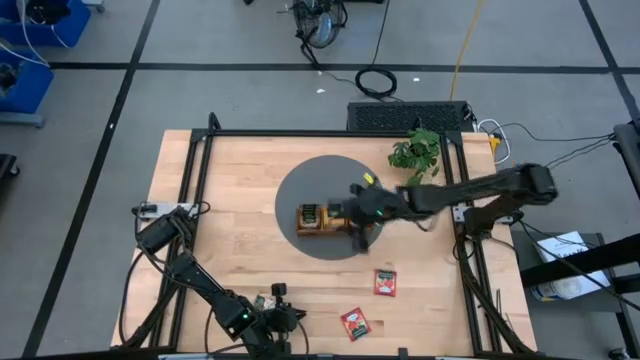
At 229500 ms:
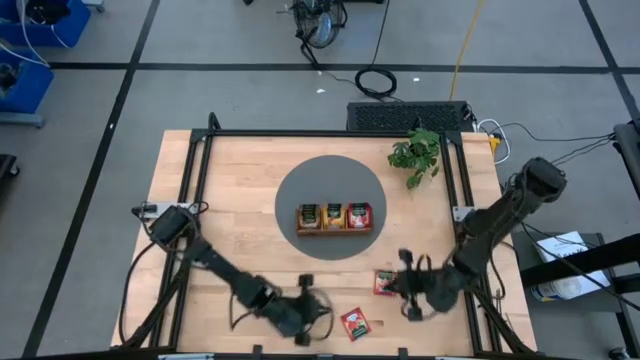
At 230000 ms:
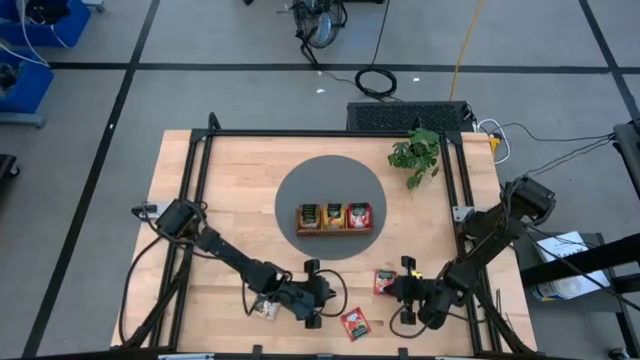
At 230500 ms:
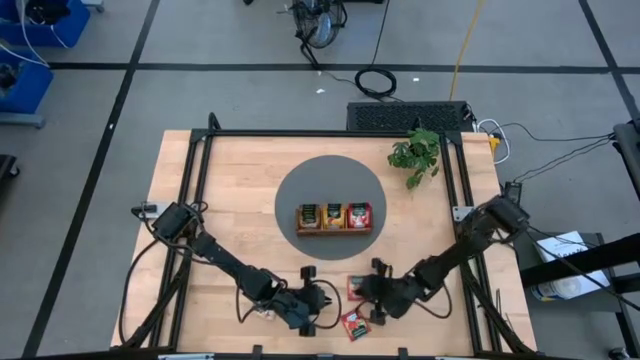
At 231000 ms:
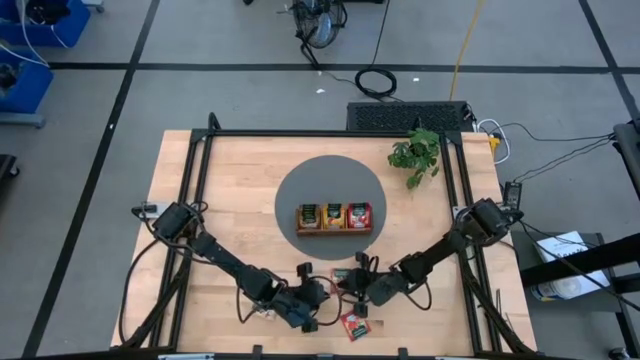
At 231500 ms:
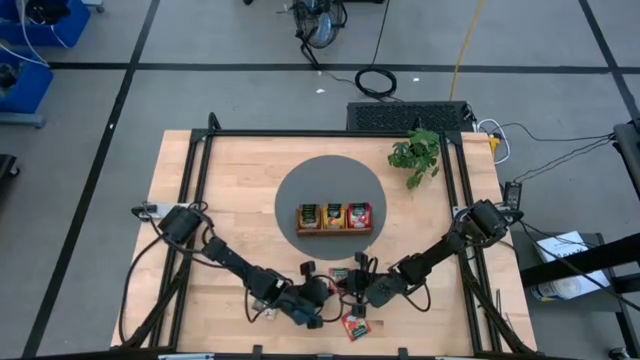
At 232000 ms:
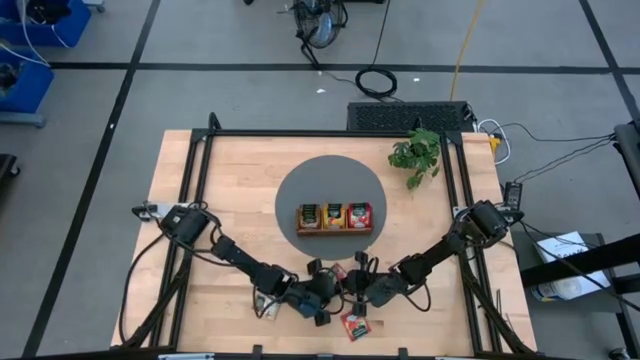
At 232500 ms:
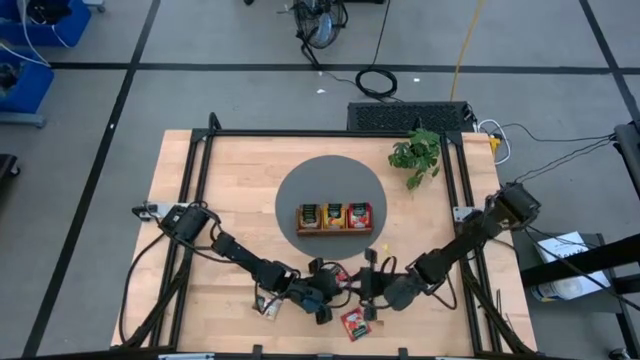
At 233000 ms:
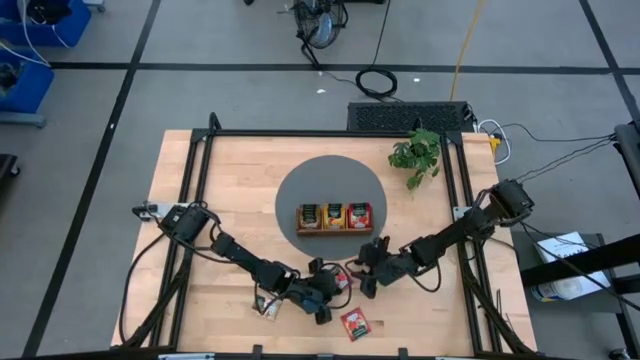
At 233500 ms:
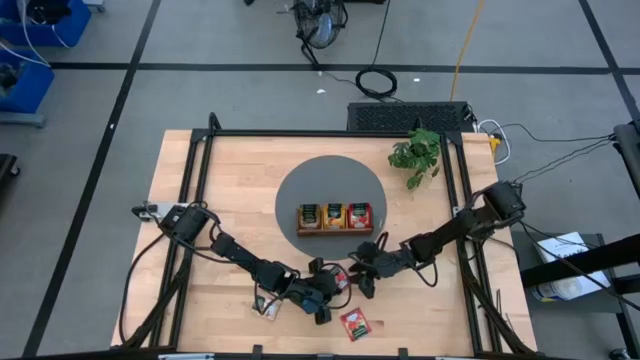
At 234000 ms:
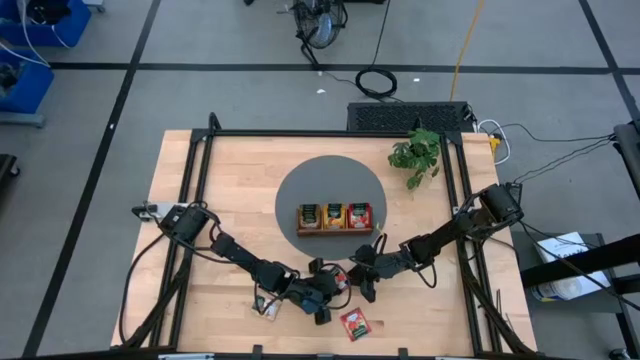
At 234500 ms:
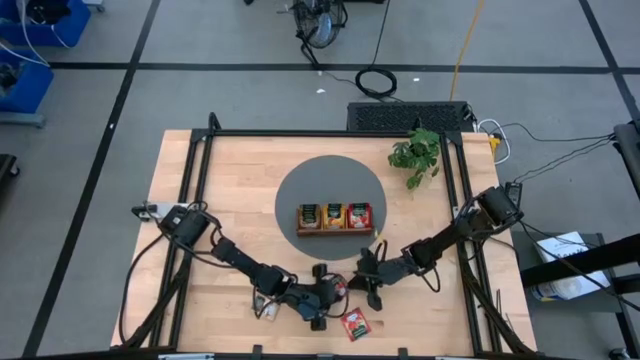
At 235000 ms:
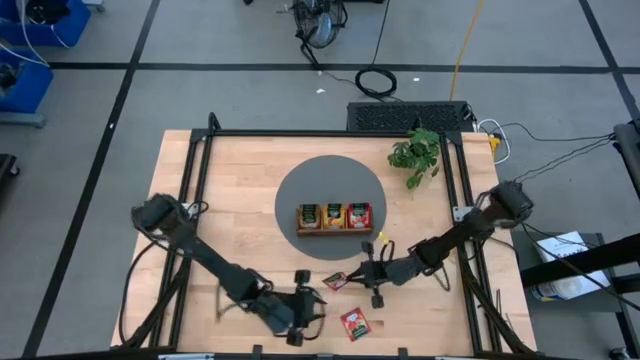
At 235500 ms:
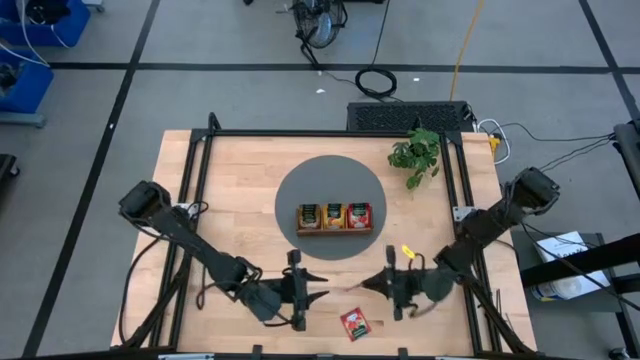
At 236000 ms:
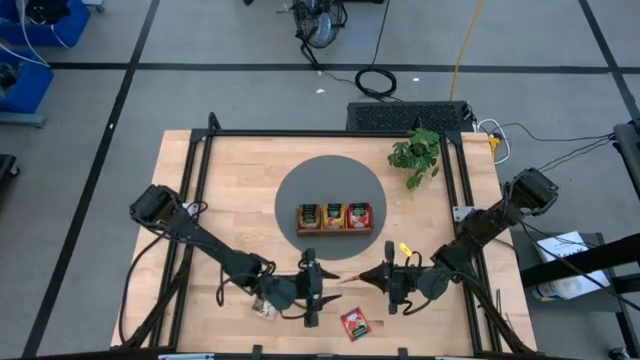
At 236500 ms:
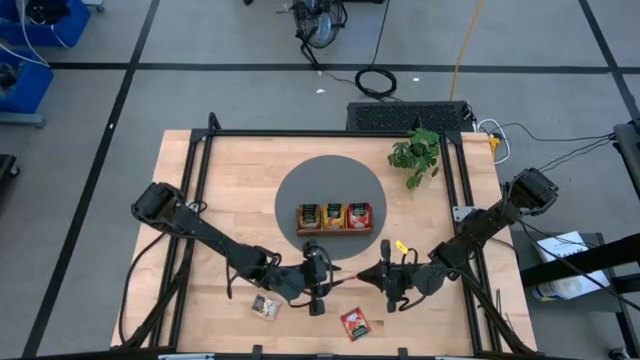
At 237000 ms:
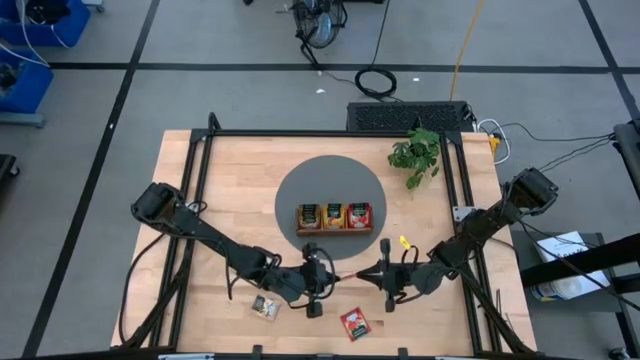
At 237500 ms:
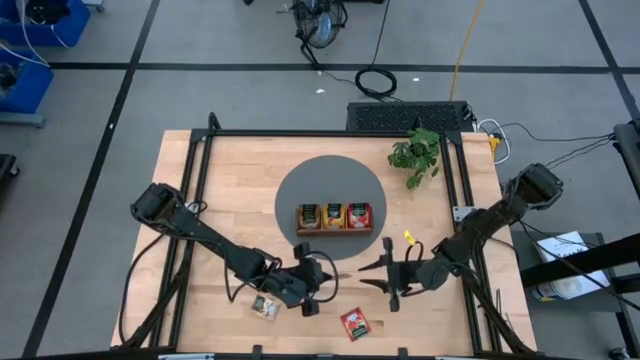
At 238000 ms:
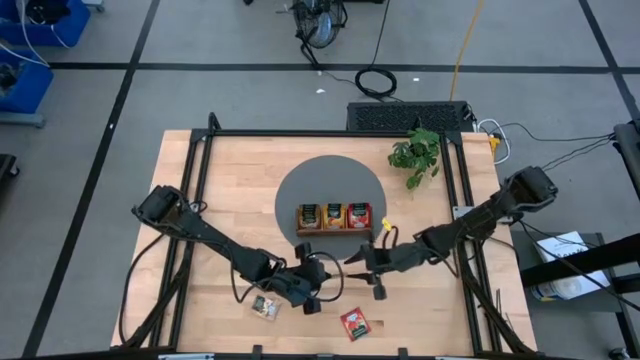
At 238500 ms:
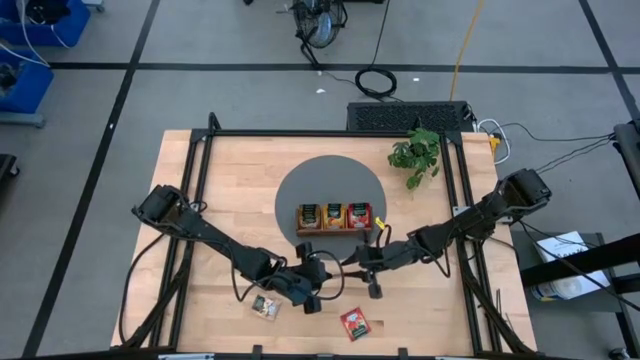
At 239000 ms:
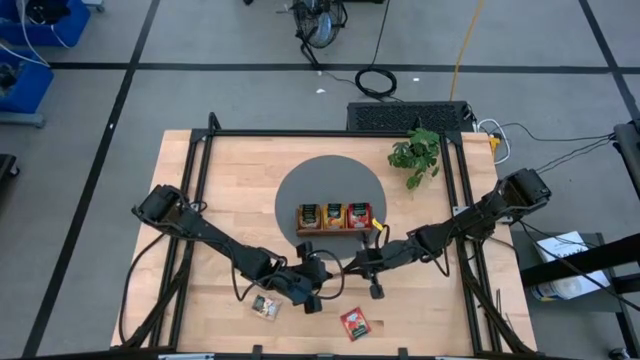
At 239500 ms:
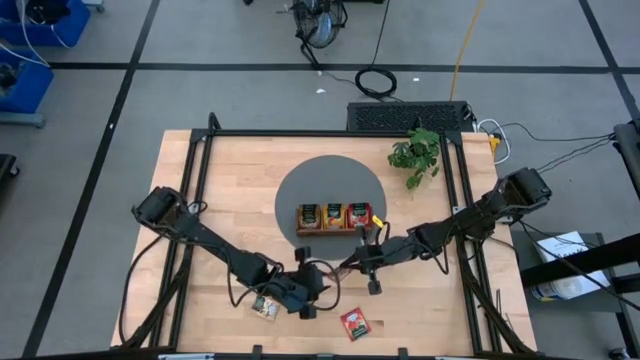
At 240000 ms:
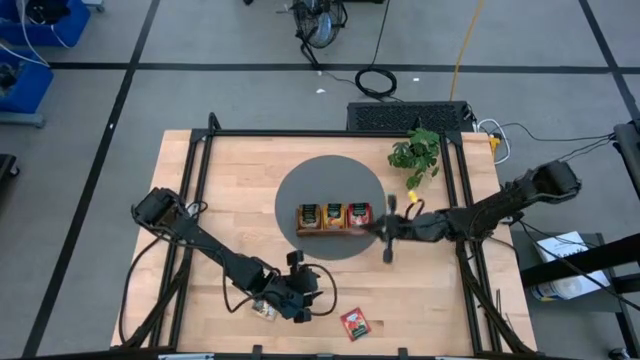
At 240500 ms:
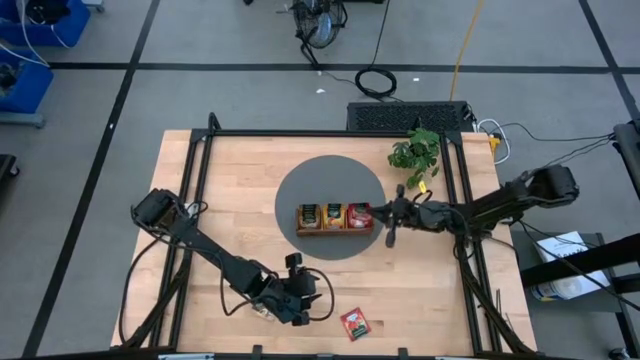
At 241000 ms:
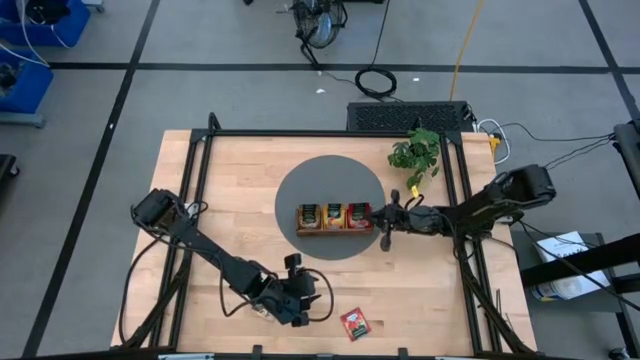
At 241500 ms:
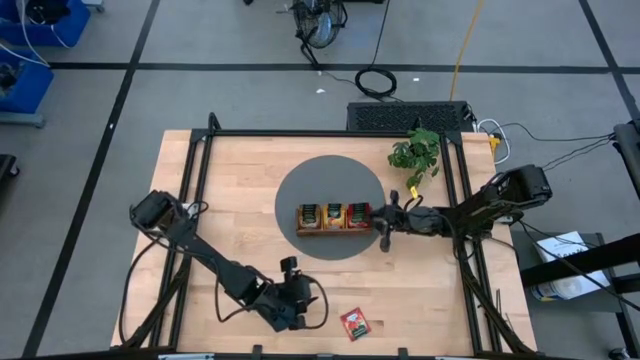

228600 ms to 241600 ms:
Task: Pick & Place Tea
Put the strawberry tea sachet into the right compartment of the wooden organizer

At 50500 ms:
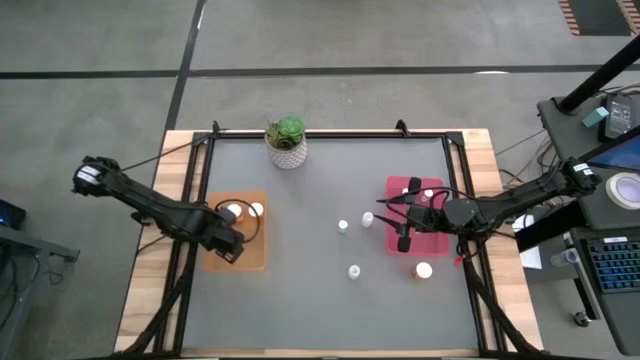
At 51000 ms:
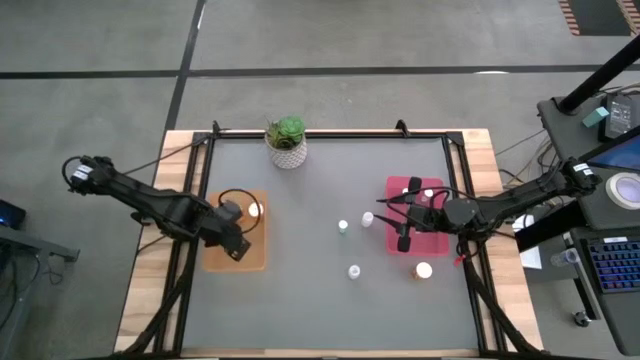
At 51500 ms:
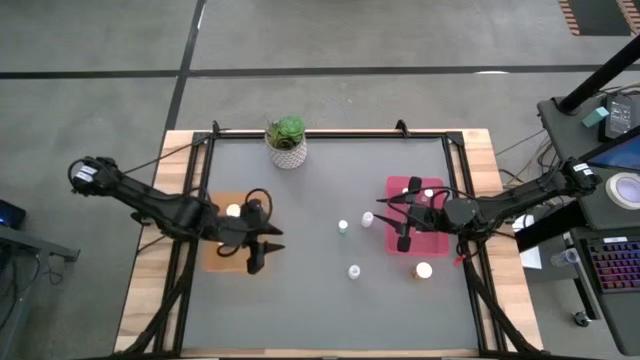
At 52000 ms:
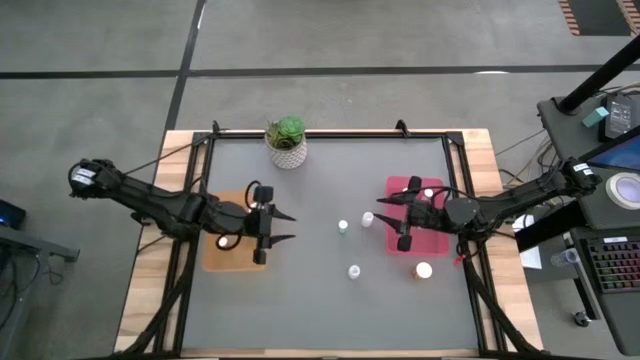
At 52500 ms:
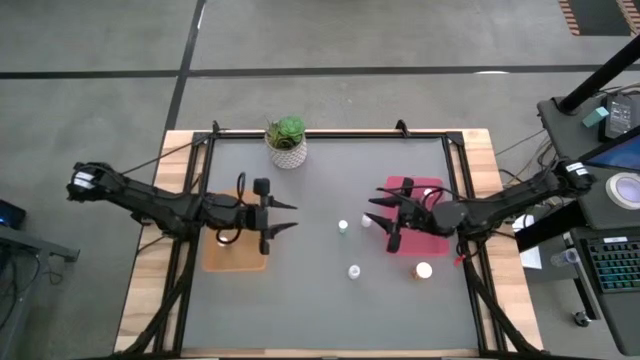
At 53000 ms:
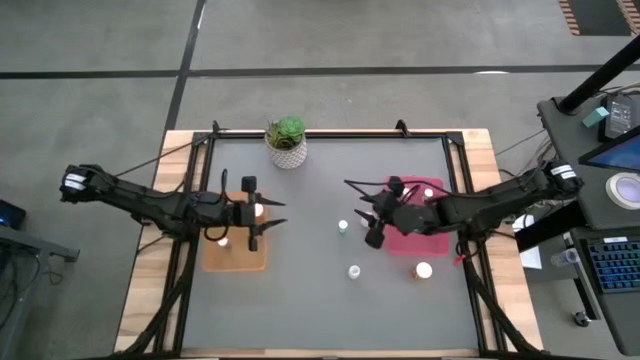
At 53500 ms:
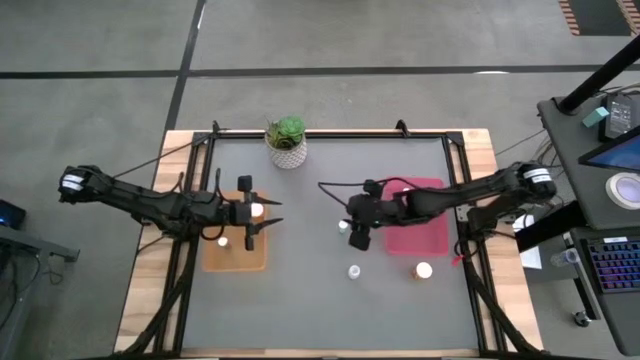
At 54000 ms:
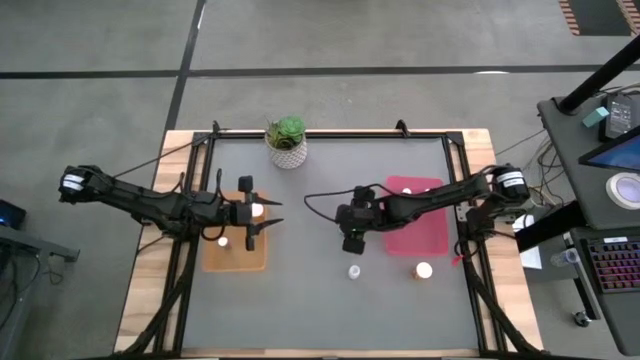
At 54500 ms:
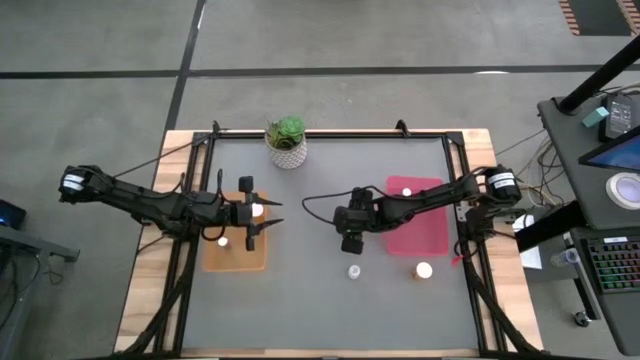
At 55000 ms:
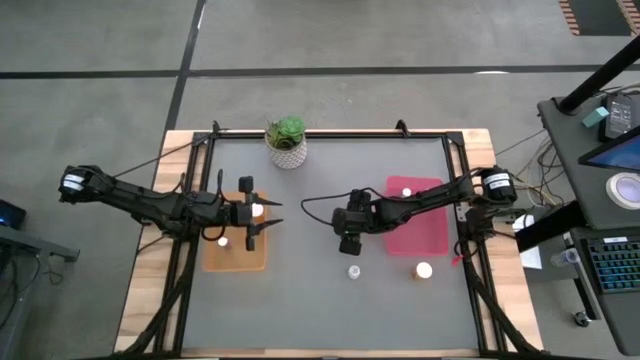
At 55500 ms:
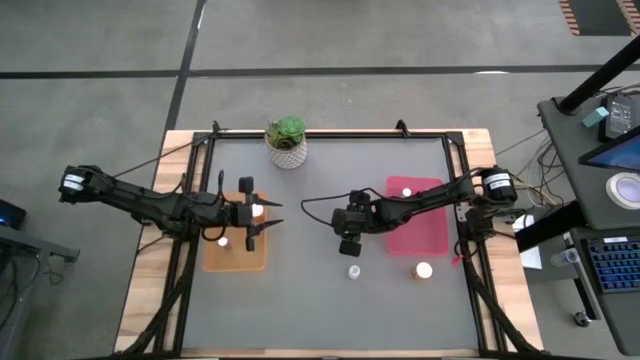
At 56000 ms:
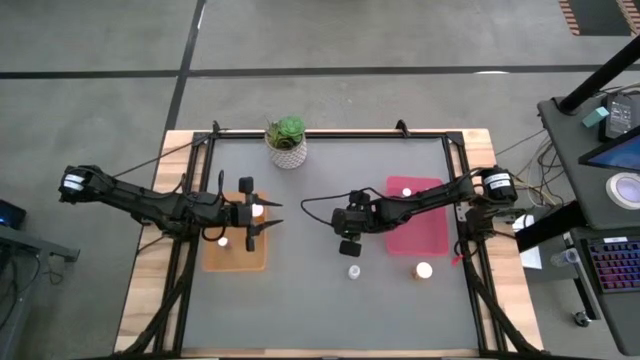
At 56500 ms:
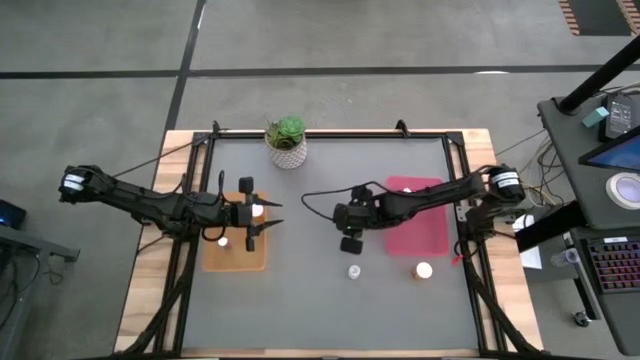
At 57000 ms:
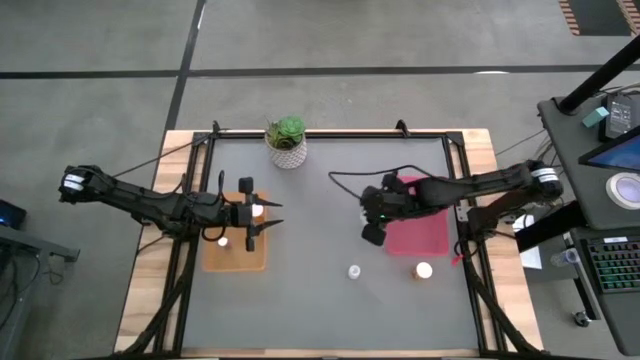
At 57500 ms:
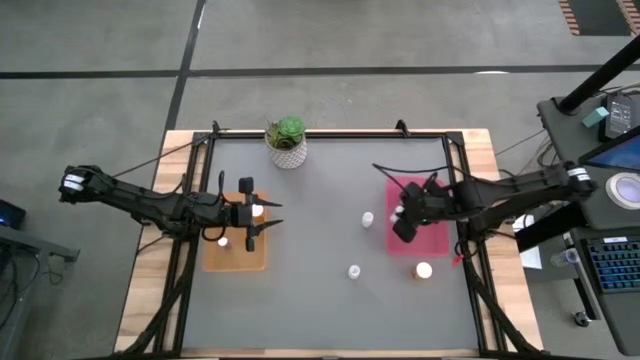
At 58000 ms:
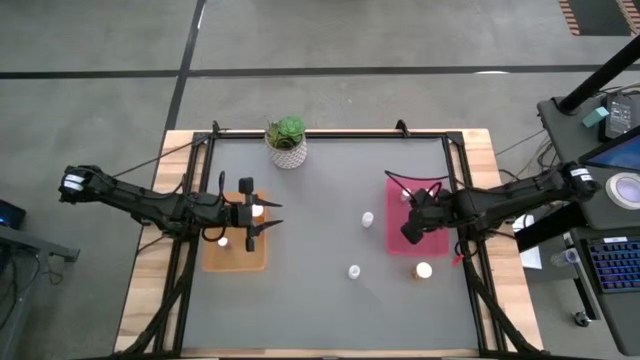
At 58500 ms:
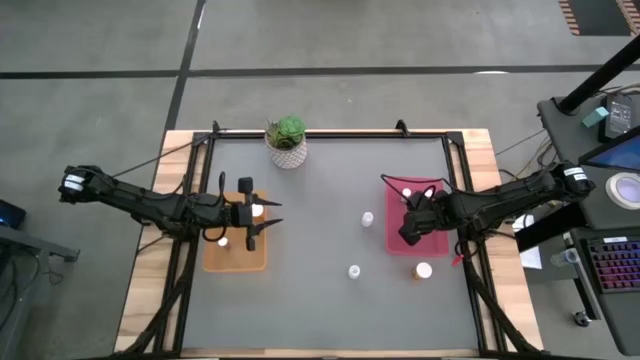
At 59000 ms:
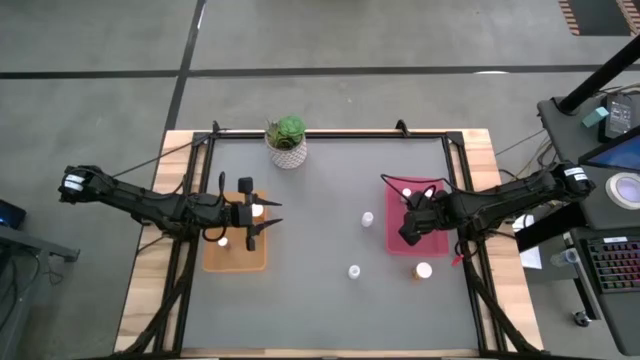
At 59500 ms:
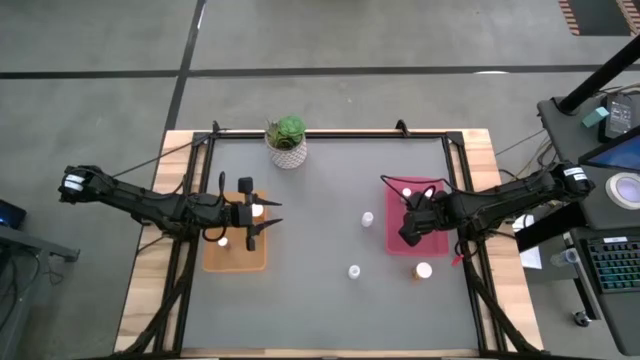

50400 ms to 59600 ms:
Task: Pick and place medicine bottles into bin by pill shape (circle, oval)
Put the blue tablet bottle into the pink bin
